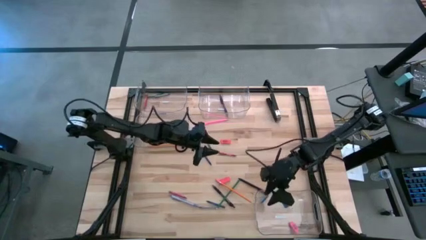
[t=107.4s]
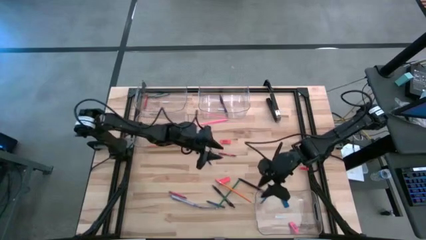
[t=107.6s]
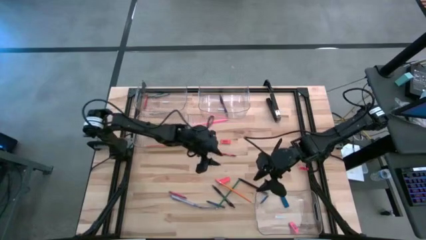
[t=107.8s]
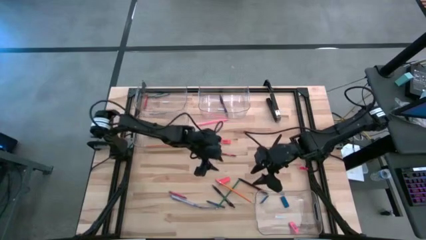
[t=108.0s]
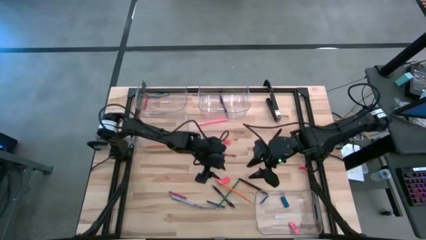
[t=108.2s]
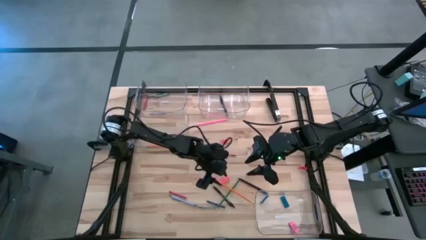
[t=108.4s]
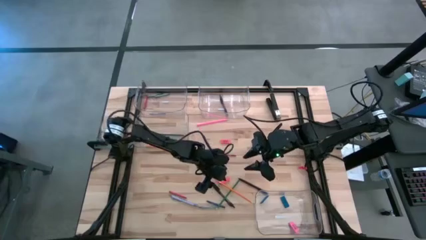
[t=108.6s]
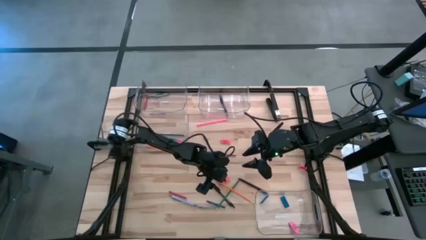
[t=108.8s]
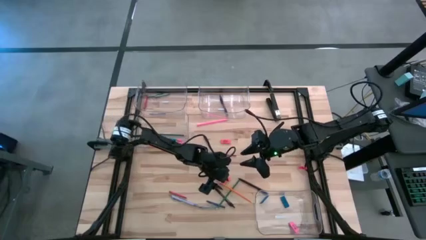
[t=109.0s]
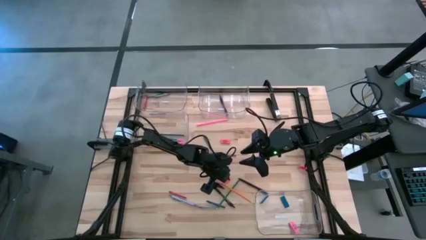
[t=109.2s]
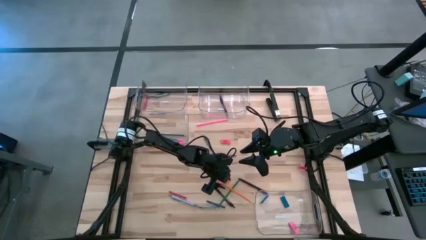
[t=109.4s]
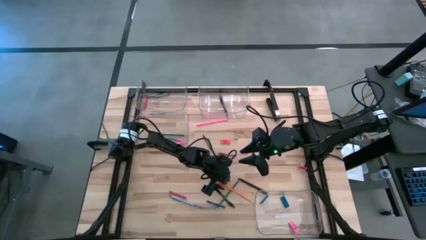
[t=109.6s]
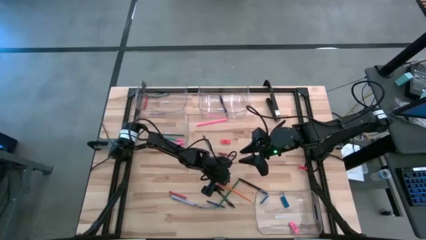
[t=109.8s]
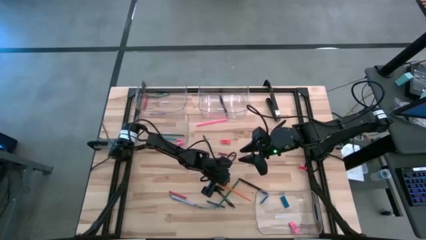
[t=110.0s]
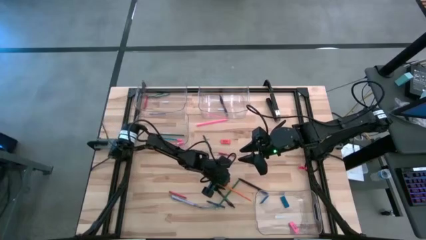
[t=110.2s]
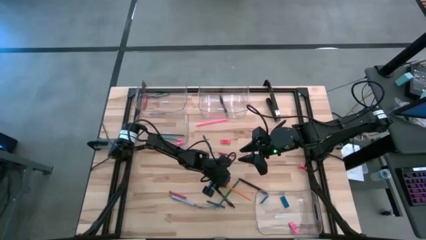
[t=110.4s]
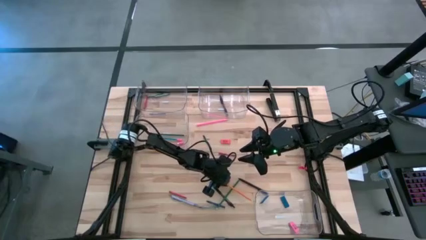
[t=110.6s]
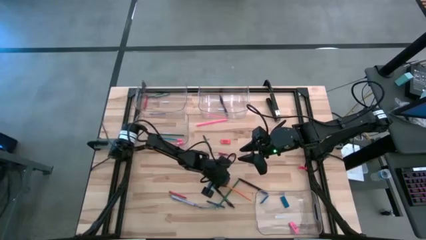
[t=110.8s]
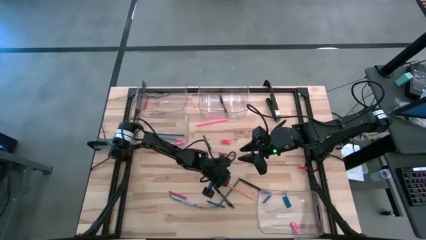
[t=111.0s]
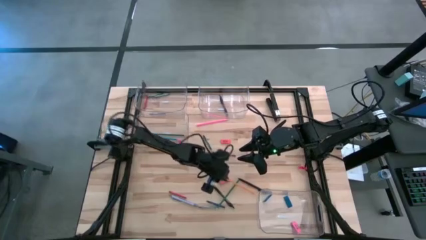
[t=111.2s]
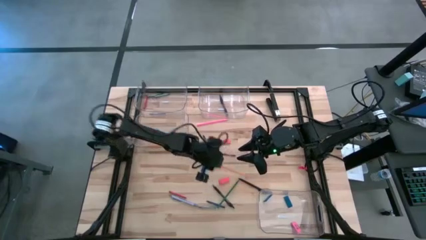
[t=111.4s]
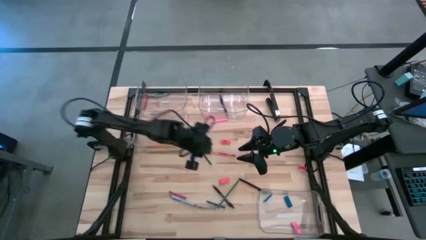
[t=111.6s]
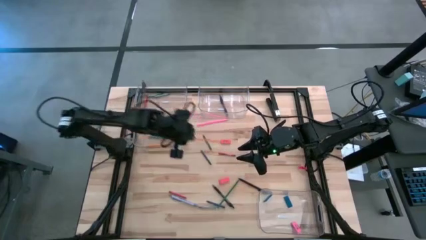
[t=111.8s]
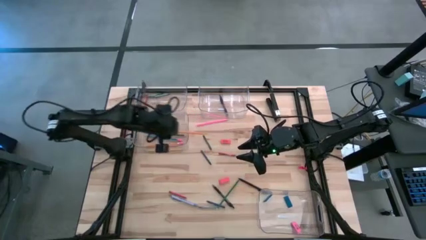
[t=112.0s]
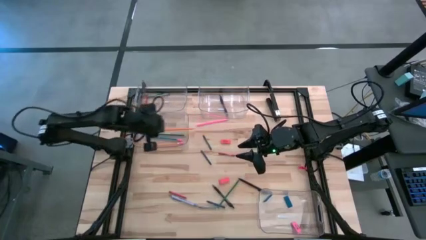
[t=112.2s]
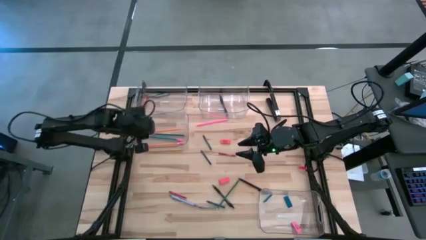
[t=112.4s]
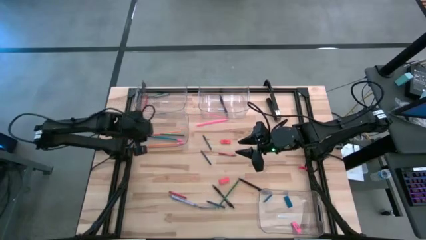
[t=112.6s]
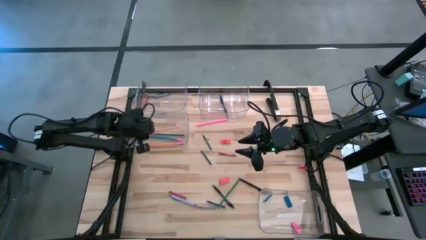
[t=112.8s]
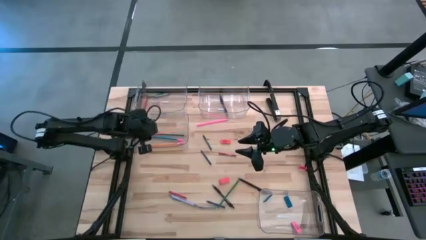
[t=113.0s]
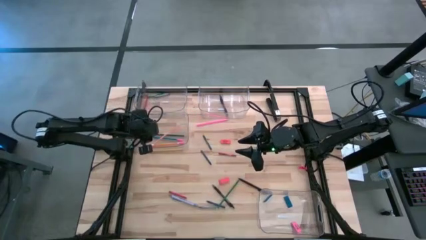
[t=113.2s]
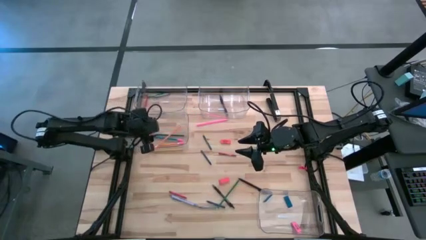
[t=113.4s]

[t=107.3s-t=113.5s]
Task: Sort crayons/erasers/pens/pencils in bins
Put the yellow pencil into the bottom left transparent bin

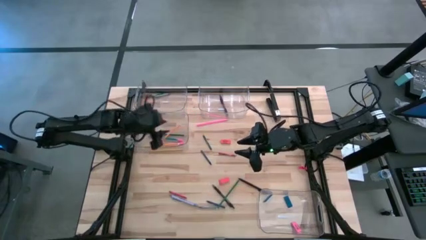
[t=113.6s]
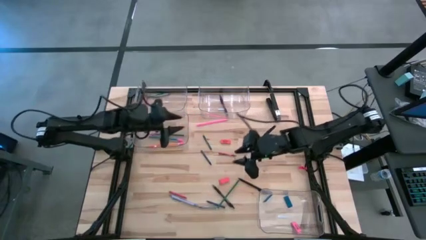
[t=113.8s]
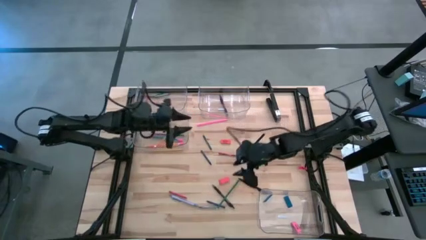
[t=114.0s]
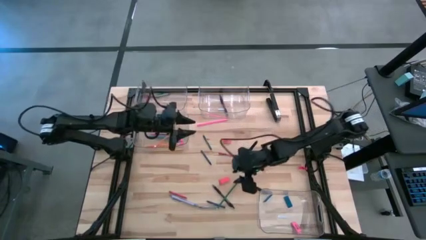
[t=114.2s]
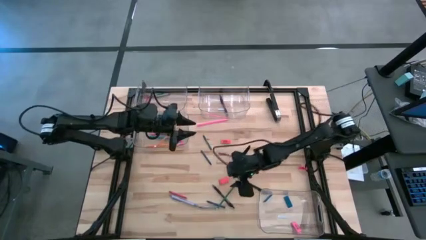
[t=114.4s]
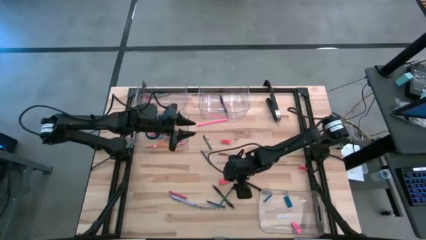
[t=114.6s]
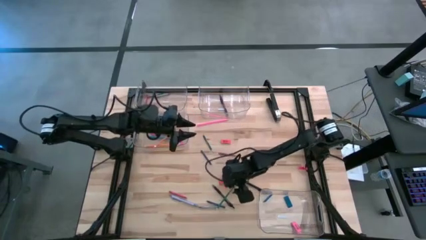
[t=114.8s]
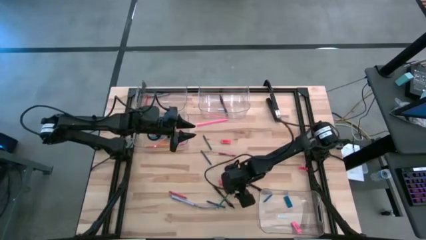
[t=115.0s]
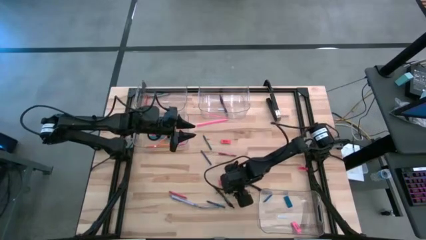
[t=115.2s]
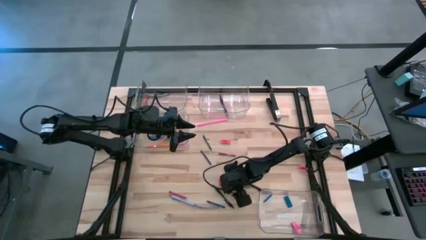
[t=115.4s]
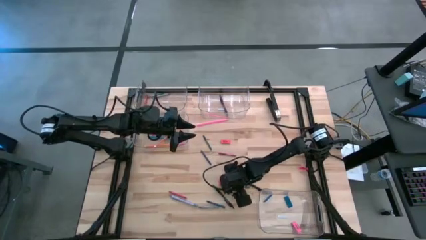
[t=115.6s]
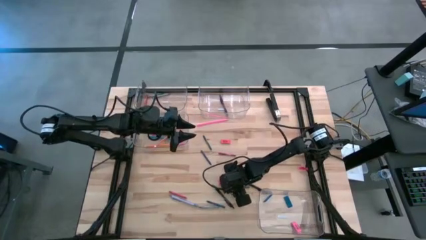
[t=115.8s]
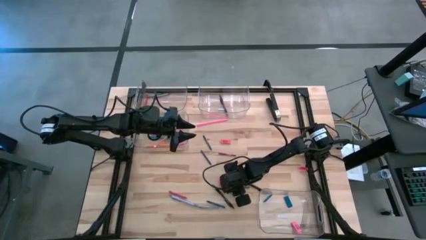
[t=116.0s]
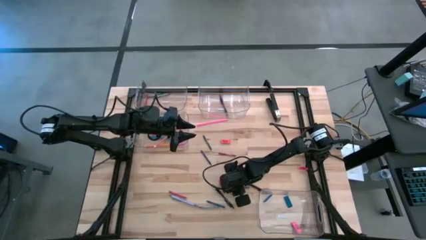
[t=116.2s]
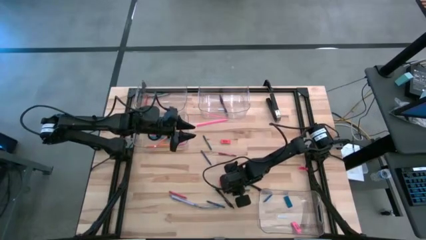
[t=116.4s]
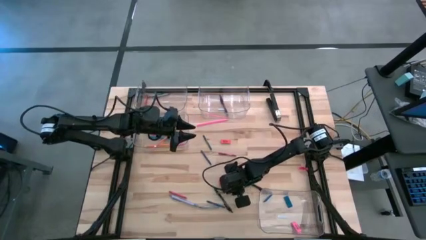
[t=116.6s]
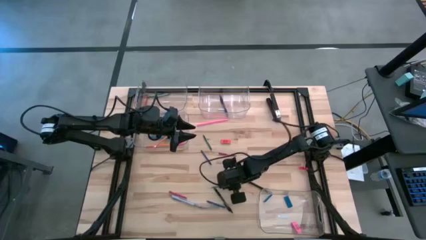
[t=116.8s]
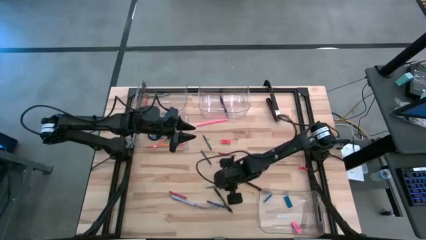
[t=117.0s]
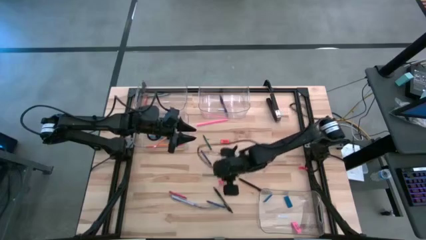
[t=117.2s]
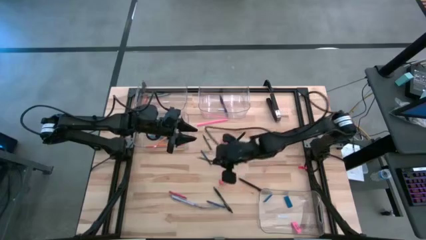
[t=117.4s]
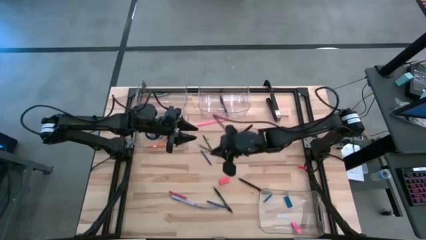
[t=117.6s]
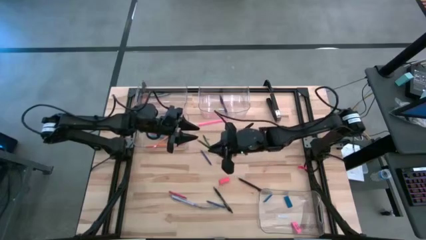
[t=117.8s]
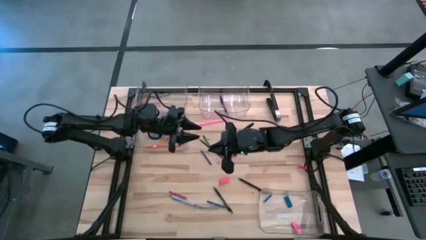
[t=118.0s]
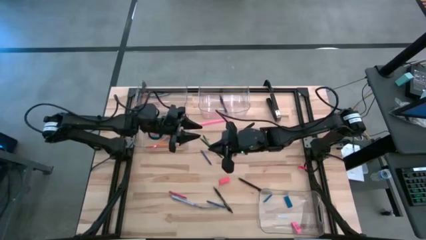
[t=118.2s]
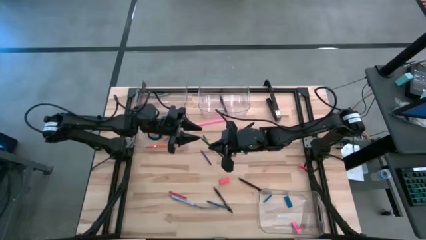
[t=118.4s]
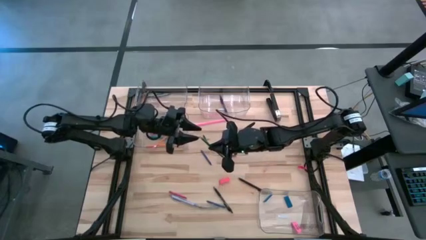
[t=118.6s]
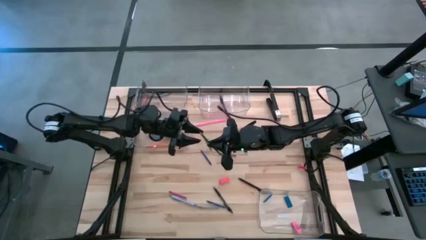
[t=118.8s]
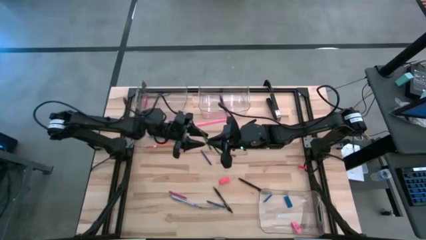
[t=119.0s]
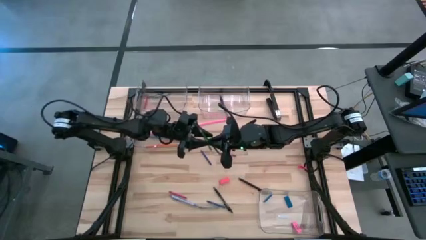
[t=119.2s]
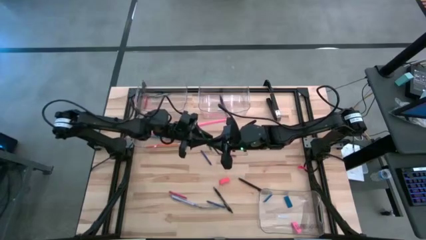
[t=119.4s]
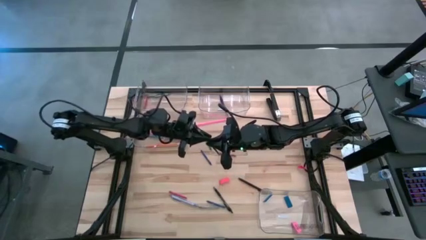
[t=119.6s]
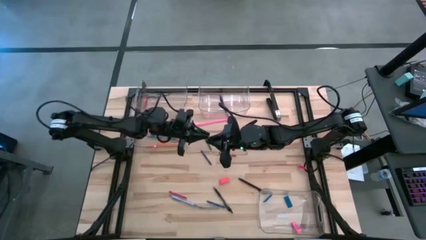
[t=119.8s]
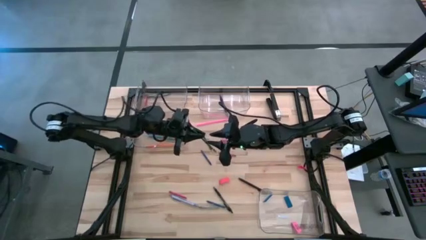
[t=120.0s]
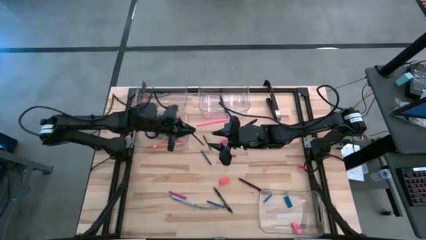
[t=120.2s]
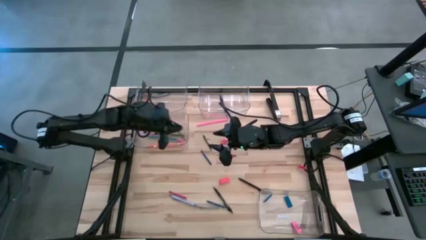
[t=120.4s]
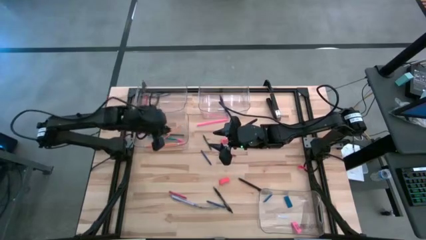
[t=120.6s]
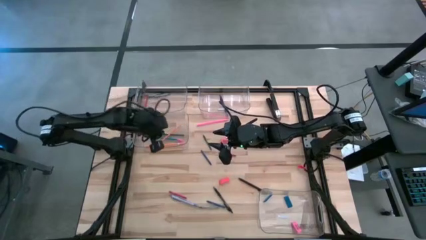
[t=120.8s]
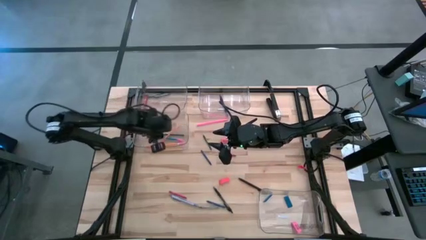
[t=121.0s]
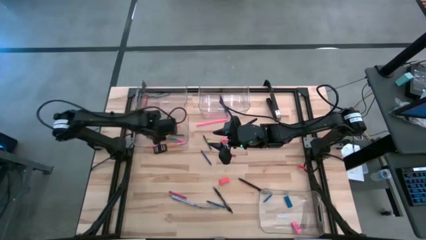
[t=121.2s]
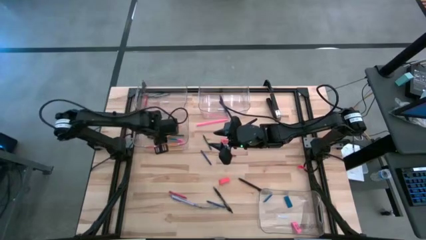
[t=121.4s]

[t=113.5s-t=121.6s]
Put the green colored pencil into the bottom left transparent bin

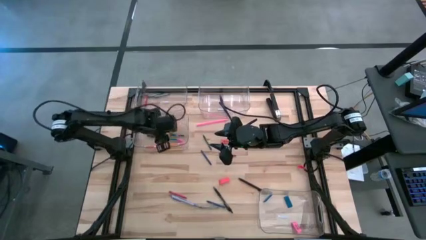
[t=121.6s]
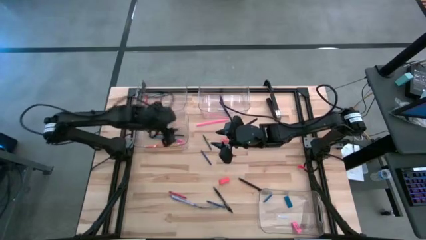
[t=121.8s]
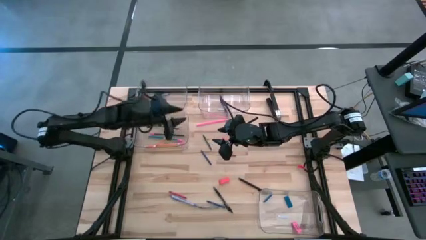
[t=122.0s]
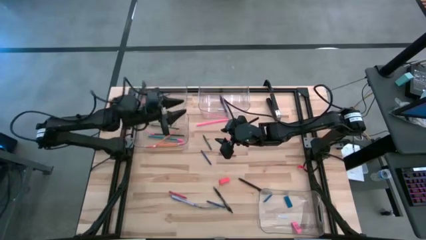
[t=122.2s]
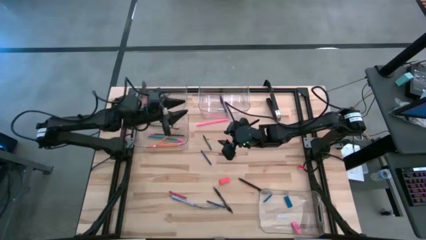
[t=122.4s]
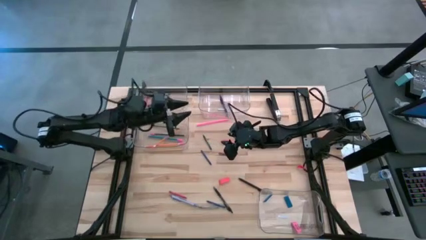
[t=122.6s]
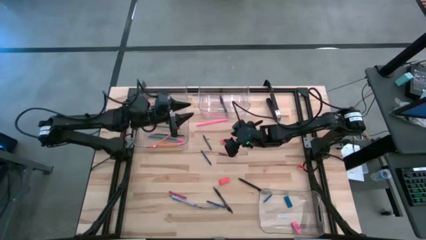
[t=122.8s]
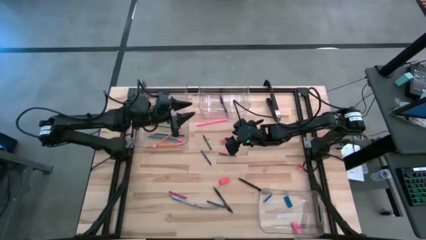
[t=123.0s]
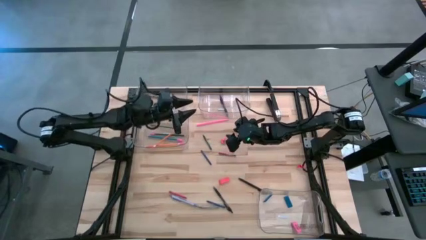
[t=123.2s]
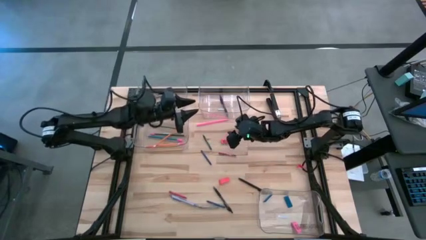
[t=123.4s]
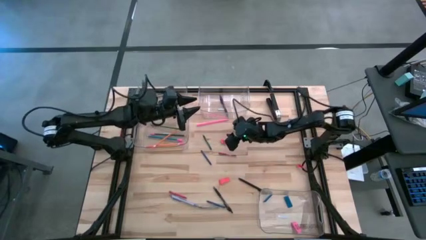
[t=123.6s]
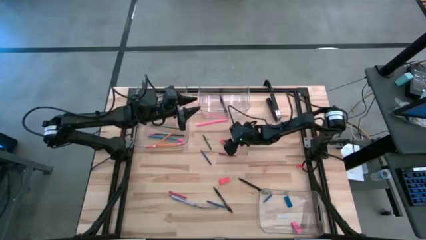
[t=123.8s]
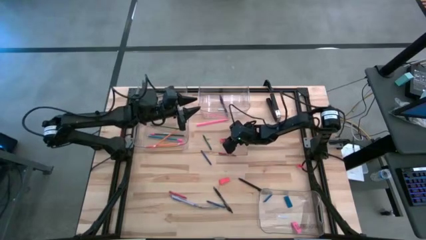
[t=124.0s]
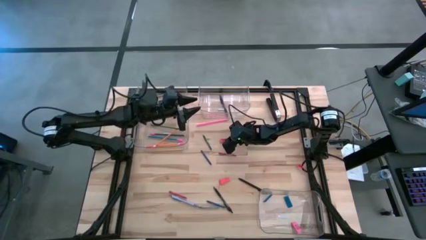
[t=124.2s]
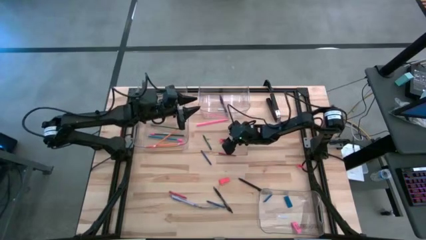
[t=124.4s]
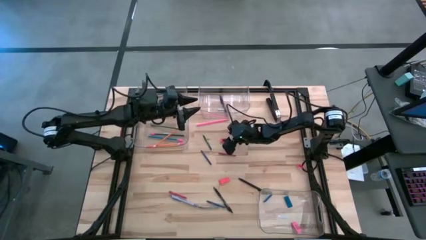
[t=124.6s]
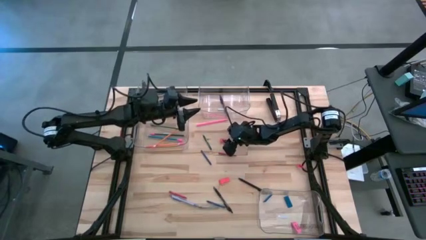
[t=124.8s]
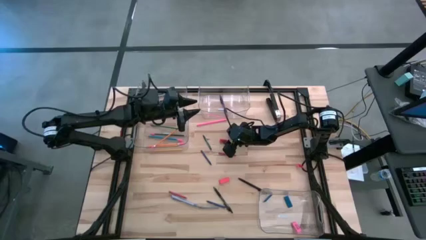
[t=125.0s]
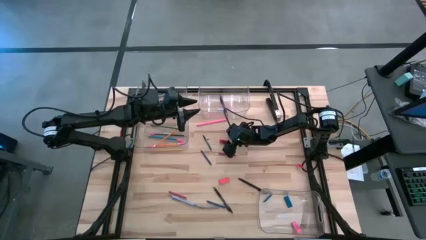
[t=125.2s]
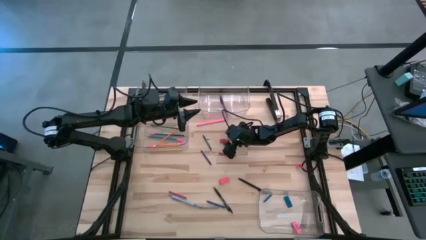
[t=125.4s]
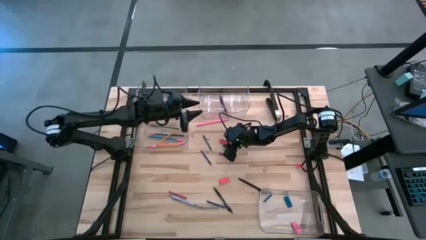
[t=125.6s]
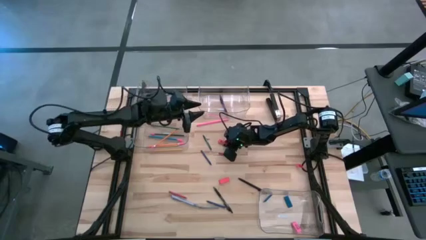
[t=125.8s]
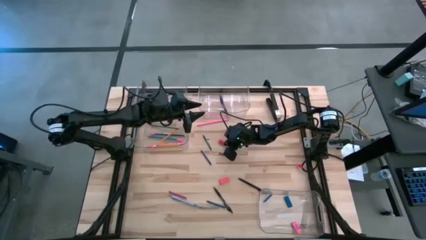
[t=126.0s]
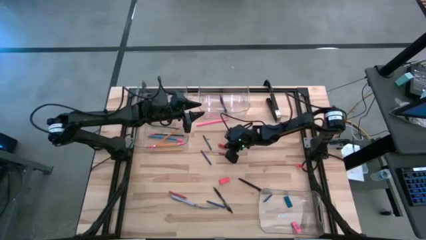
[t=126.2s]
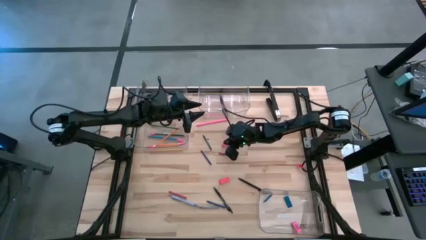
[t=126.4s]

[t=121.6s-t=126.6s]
Put the orange eraser into the bottom right transparent bin
